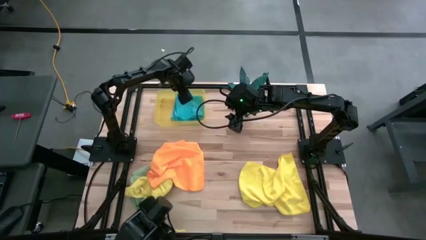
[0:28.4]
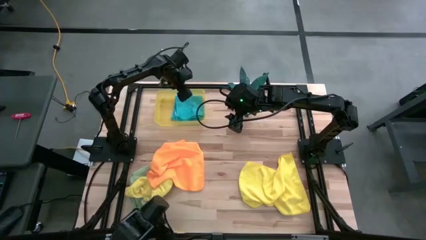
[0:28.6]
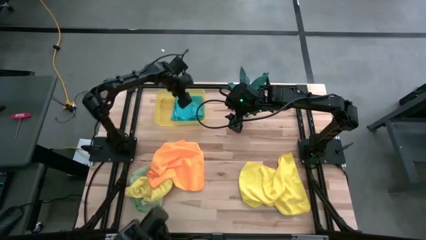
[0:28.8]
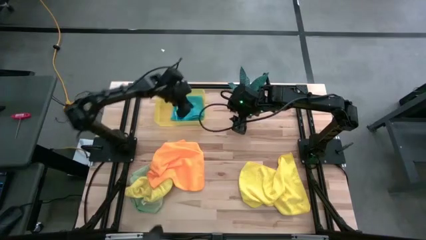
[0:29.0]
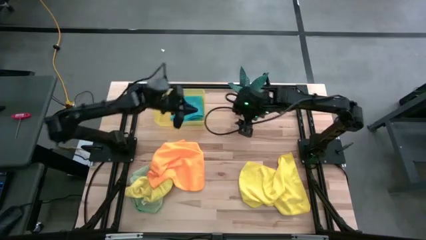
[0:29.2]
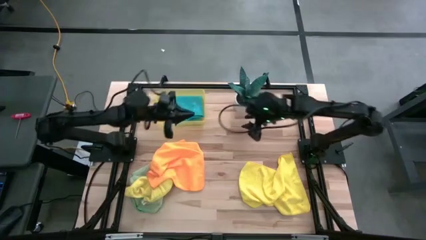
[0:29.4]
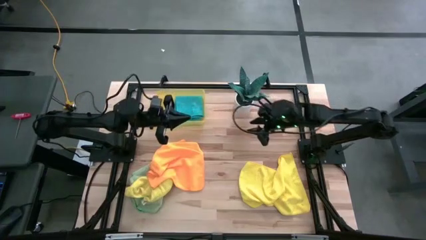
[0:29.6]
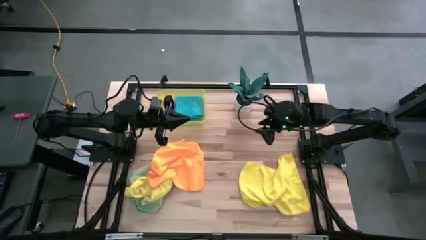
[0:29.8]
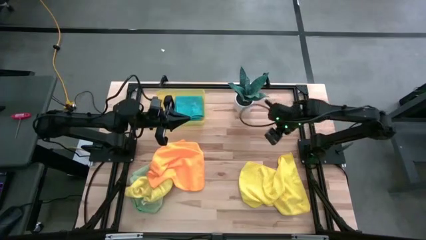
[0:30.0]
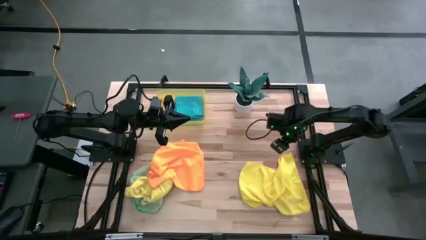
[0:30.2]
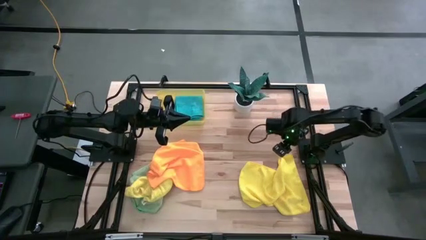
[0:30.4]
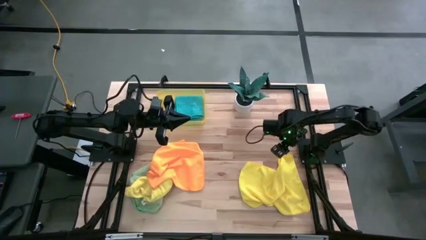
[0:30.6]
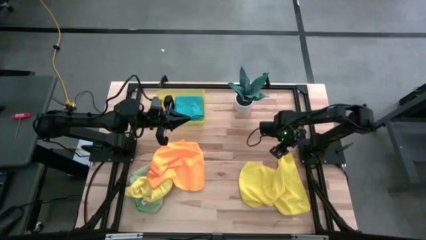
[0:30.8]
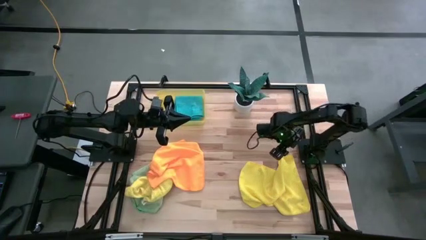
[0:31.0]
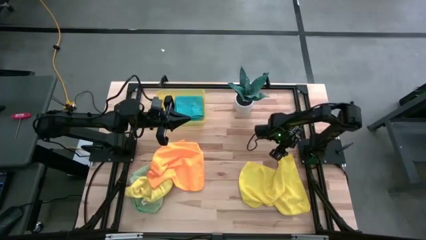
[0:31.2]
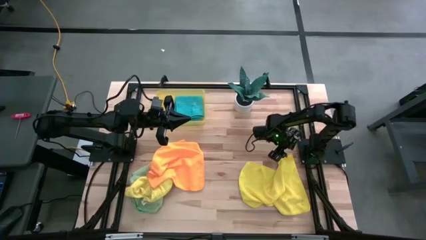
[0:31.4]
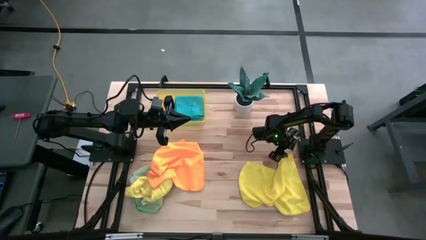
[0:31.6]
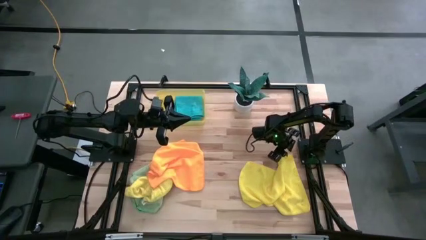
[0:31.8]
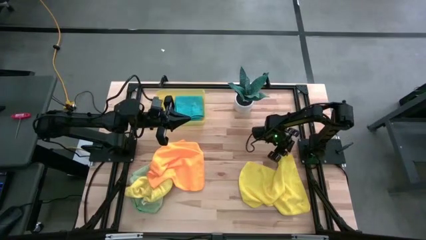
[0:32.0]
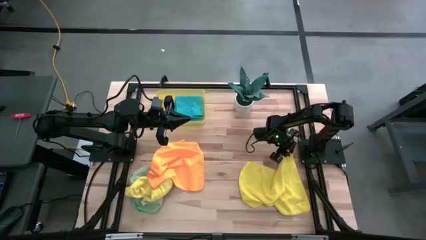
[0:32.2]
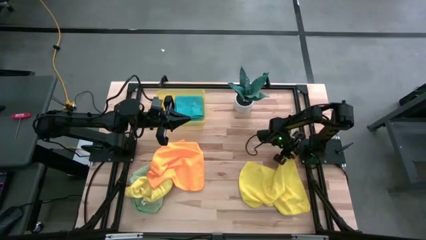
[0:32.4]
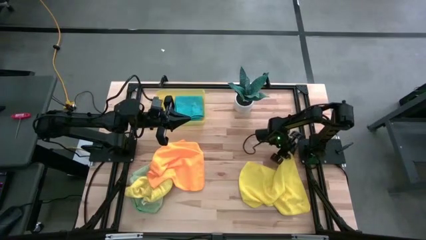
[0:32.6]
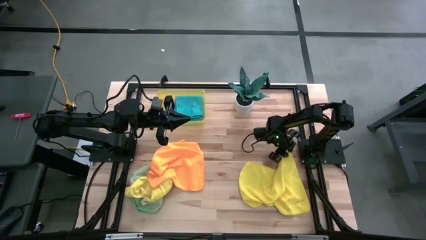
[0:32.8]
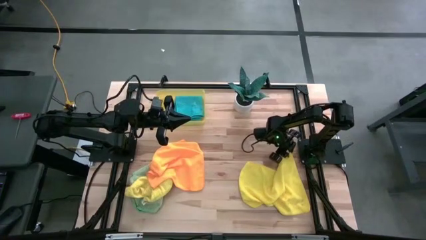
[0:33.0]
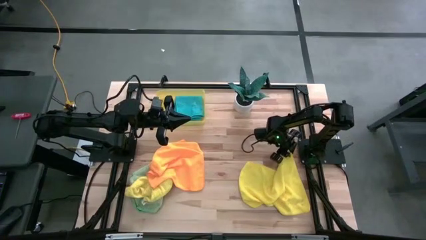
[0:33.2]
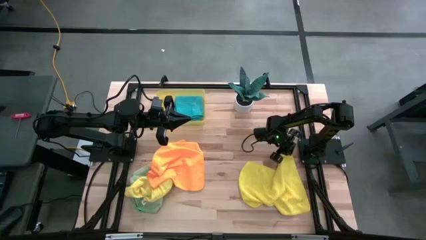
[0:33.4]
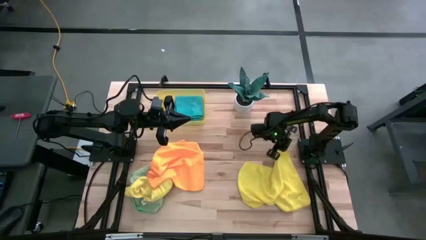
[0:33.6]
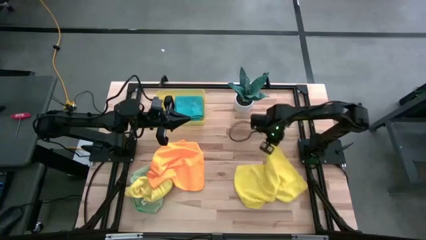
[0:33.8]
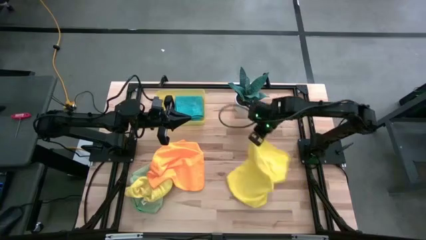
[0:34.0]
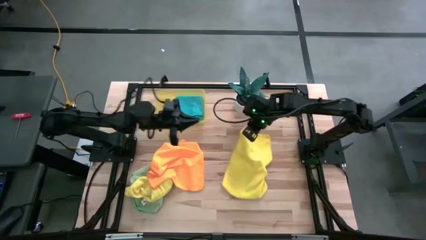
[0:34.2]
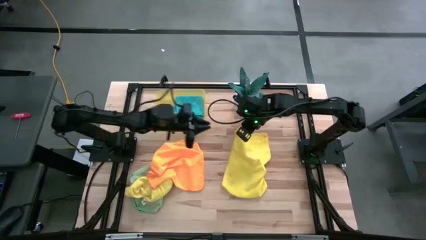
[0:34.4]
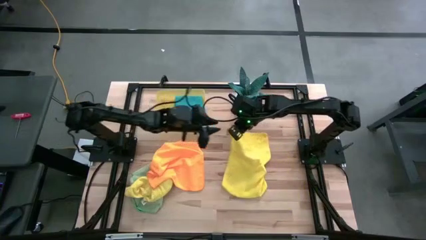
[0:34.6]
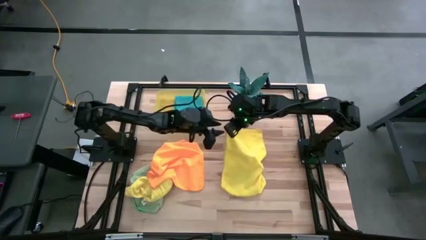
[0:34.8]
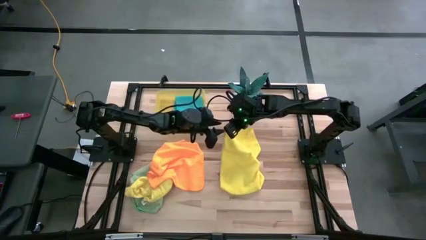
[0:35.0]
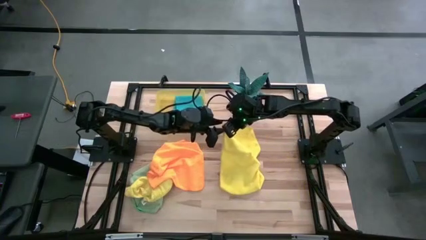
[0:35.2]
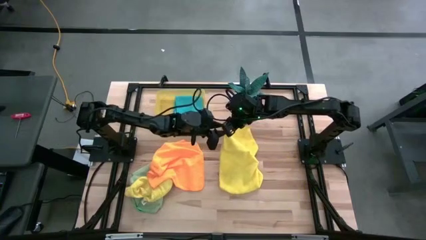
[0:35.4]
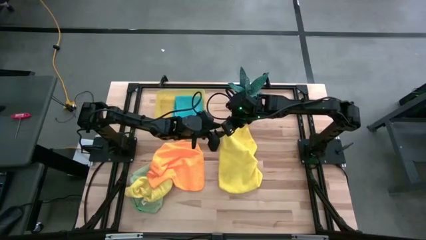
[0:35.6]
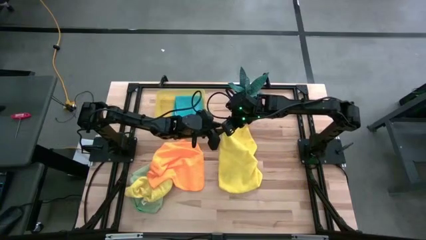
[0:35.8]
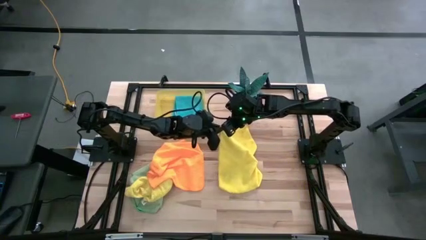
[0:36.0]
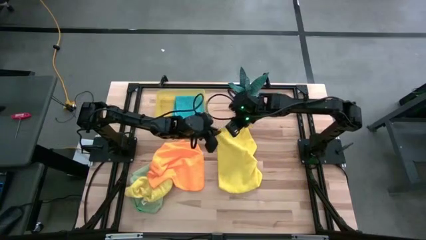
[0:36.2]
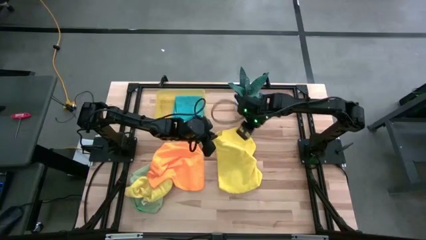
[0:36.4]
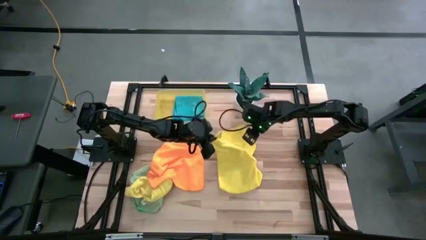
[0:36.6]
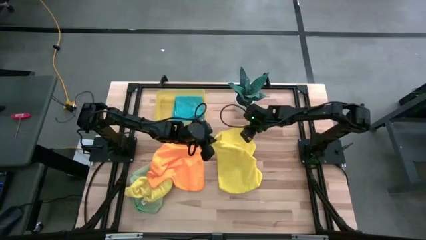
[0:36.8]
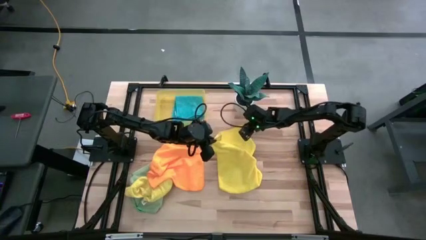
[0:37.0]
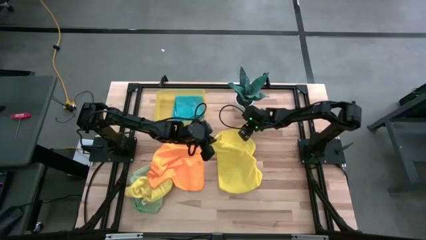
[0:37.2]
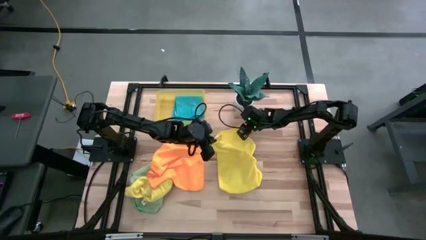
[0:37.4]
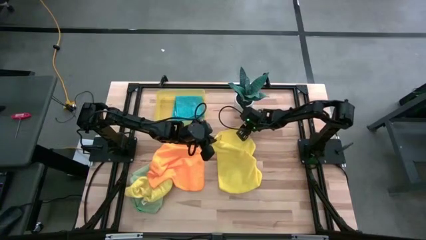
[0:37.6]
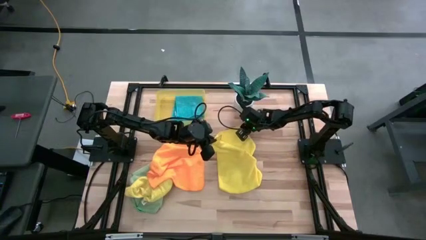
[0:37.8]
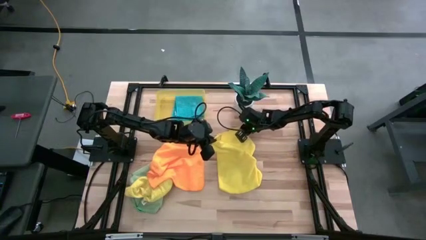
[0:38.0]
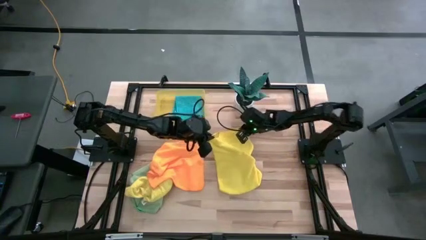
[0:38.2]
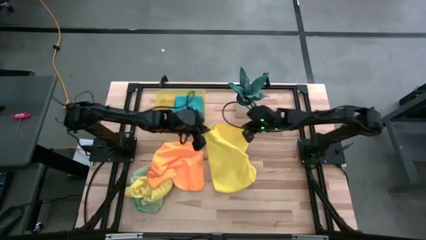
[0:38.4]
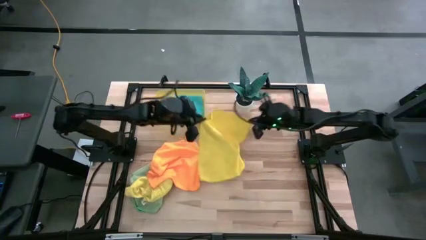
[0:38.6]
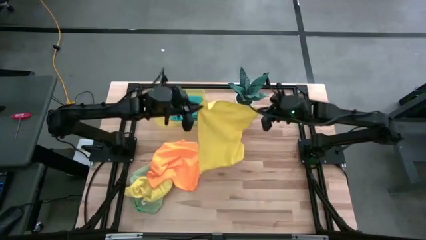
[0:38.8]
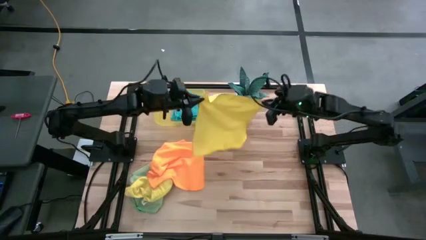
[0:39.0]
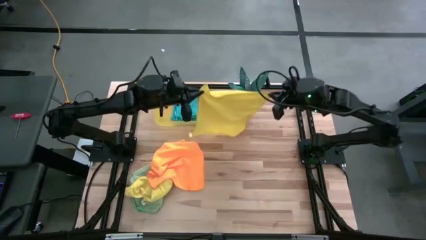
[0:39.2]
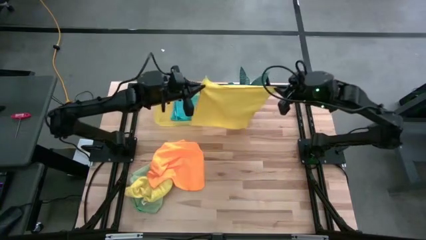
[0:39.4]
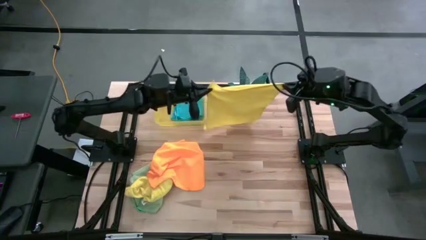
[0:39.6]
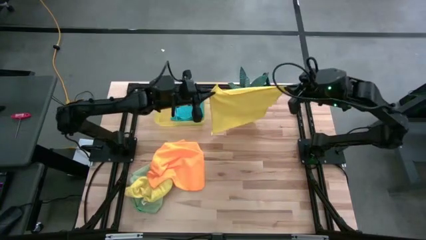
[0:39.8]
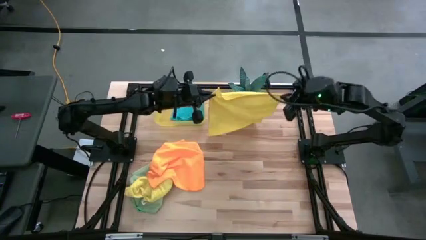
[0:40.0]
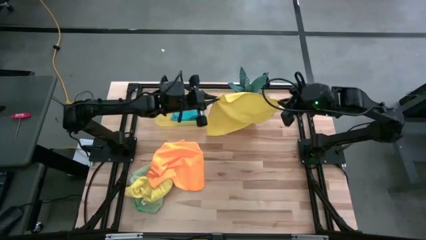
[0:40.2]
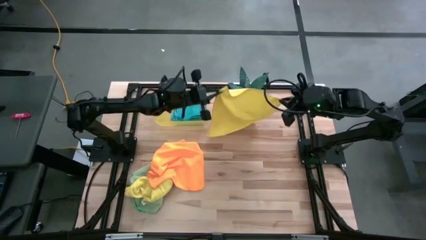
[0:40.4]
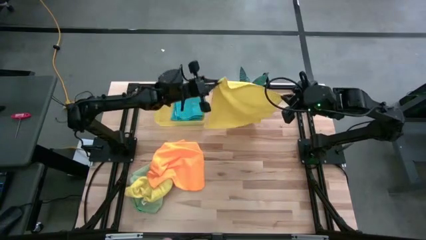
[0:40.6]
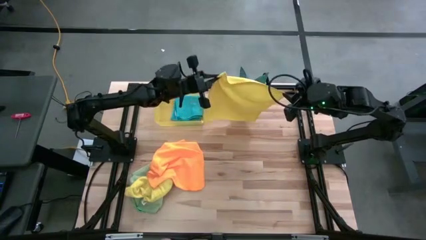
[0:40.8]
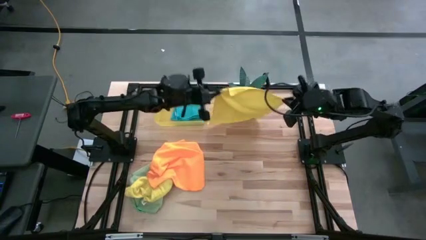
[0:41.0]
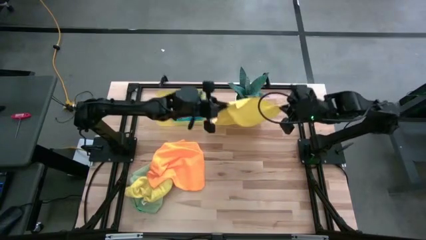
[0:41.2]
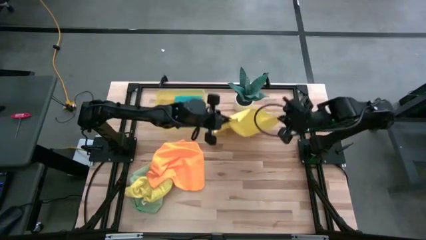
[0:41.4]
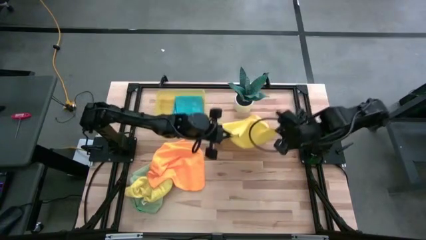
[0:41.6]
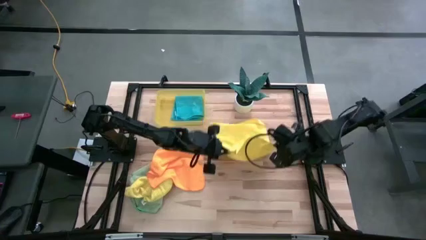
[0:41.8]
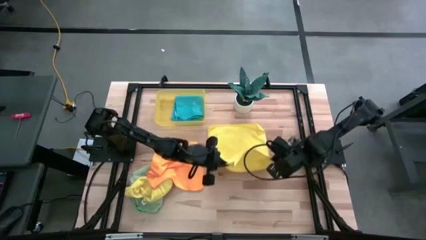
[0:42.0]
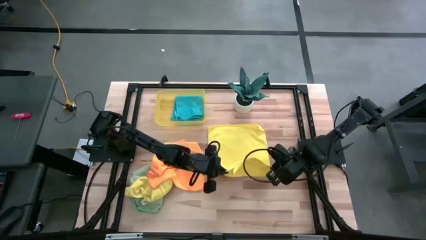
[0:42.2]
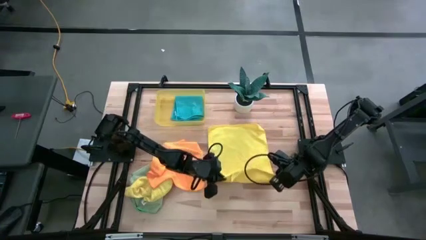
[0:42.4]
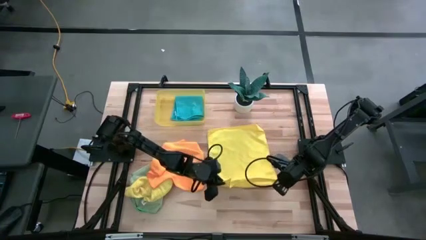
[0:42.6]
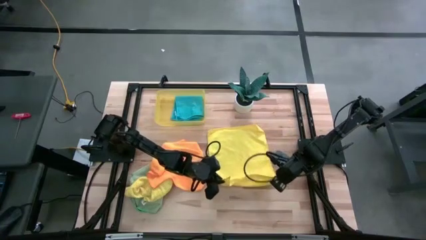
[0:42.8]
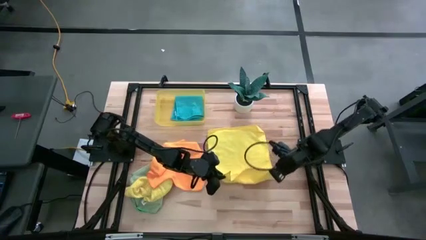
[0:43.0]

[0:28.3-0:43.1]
Task: Fold microfiber towels
Fold the right yellow microfiber cloth
